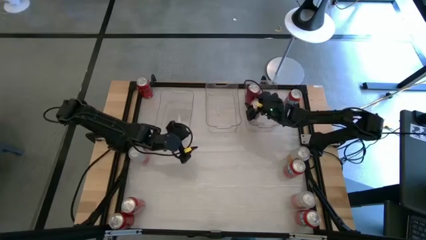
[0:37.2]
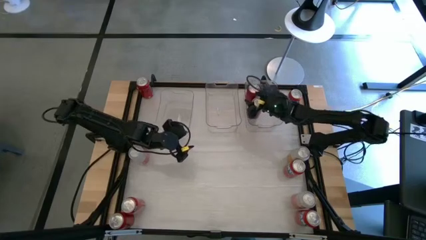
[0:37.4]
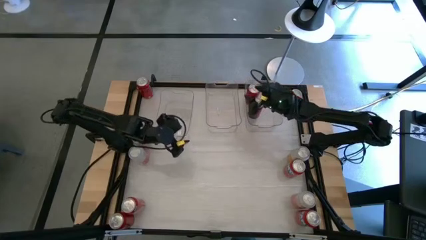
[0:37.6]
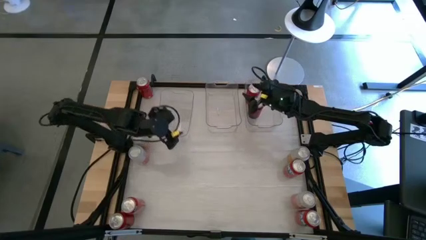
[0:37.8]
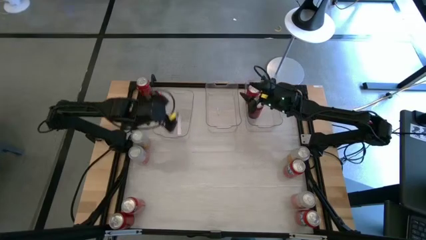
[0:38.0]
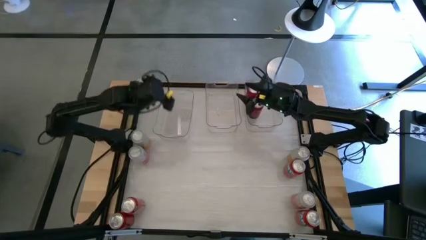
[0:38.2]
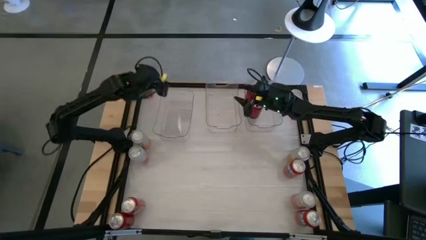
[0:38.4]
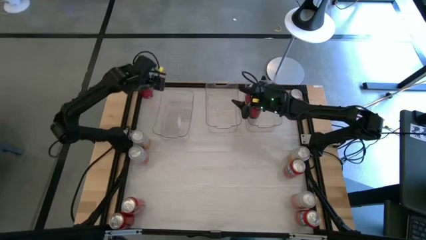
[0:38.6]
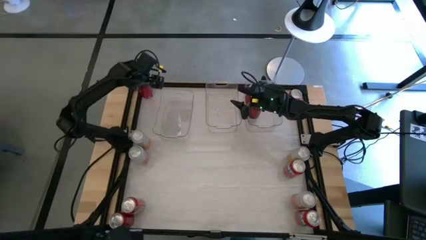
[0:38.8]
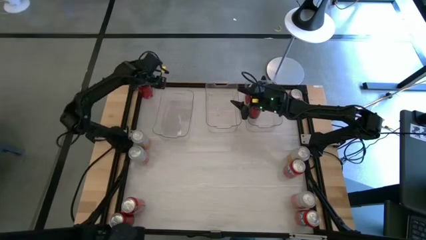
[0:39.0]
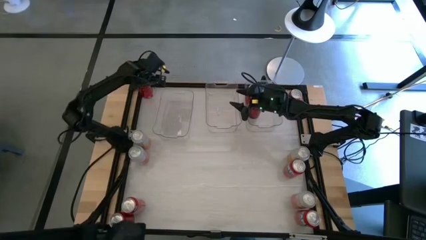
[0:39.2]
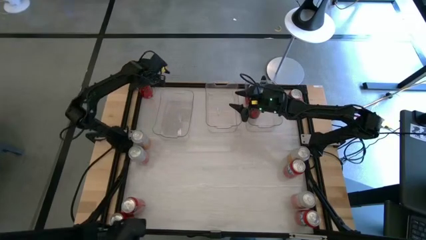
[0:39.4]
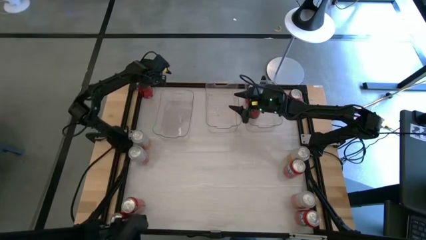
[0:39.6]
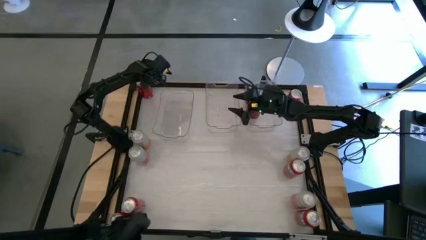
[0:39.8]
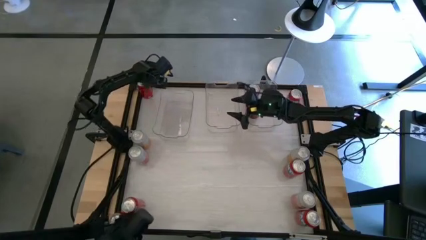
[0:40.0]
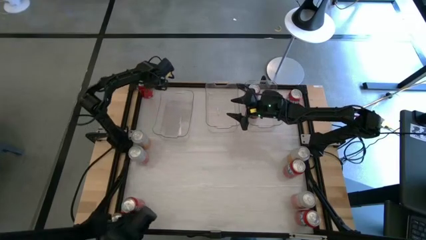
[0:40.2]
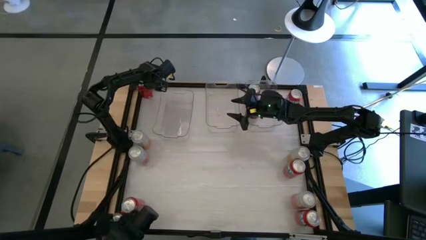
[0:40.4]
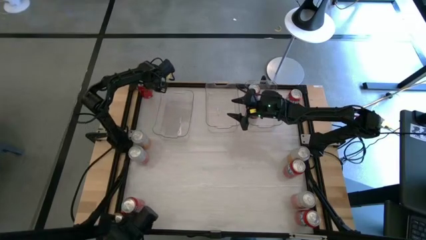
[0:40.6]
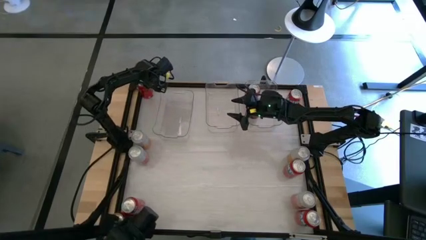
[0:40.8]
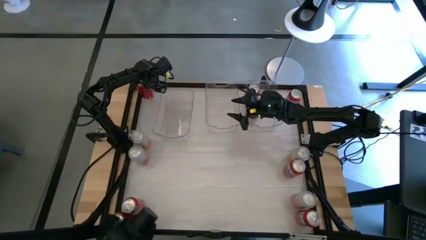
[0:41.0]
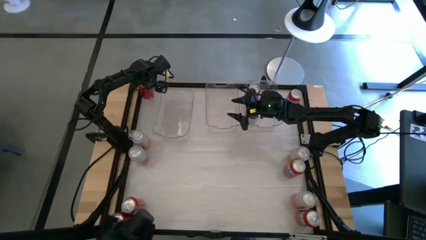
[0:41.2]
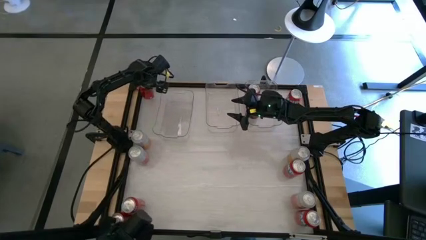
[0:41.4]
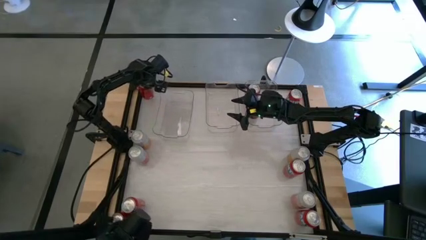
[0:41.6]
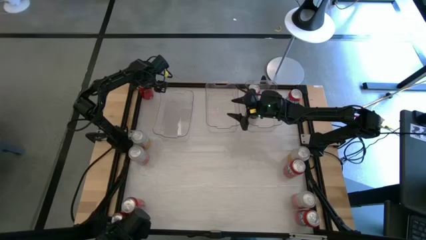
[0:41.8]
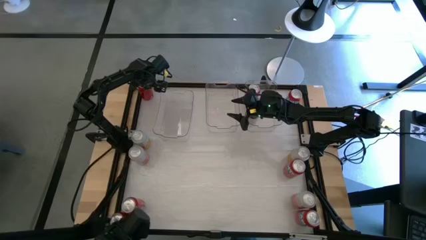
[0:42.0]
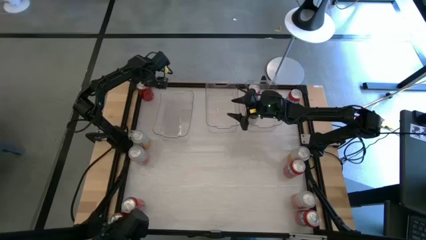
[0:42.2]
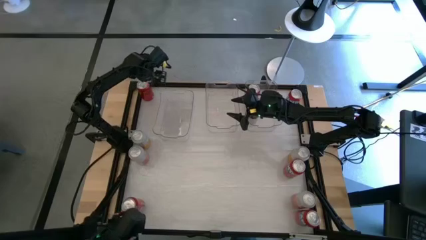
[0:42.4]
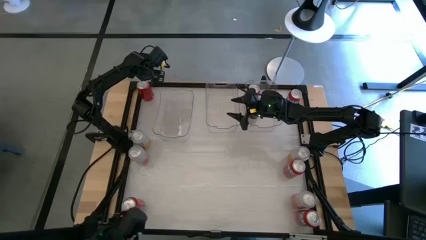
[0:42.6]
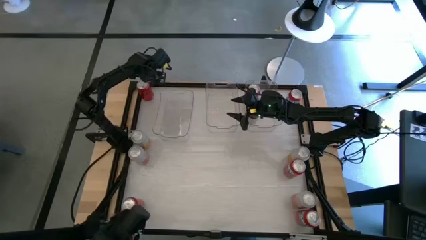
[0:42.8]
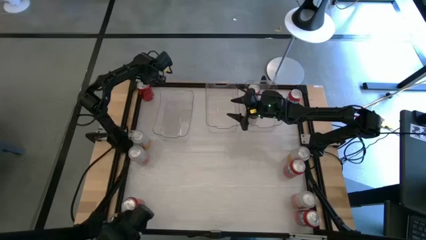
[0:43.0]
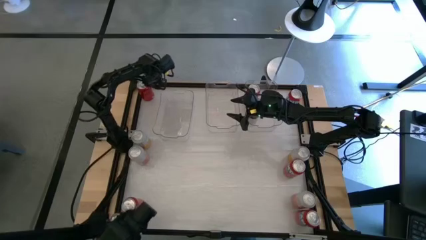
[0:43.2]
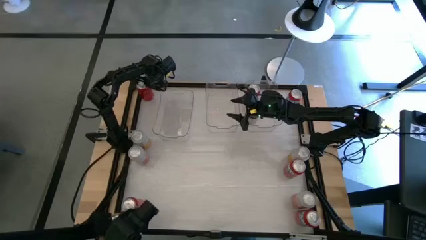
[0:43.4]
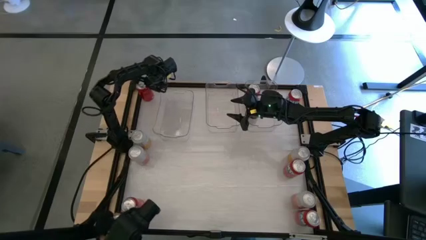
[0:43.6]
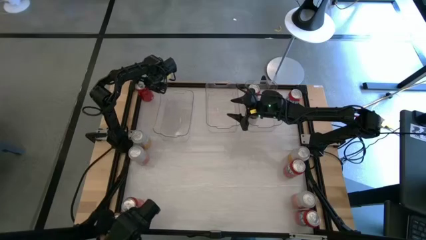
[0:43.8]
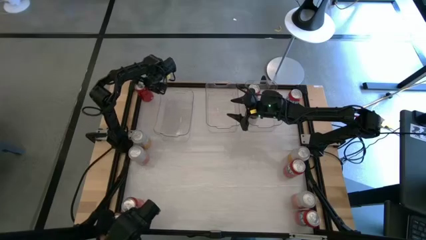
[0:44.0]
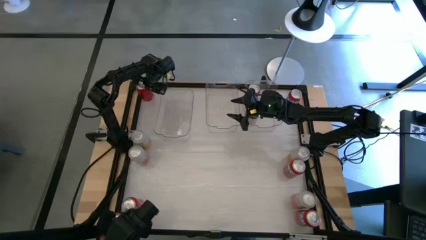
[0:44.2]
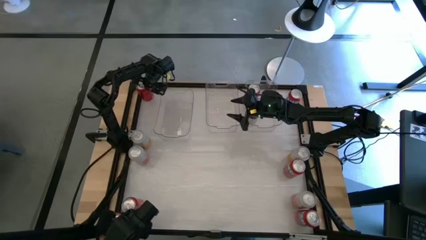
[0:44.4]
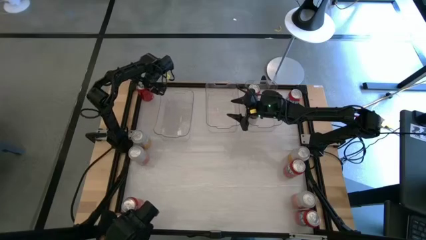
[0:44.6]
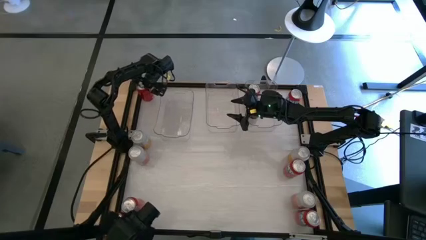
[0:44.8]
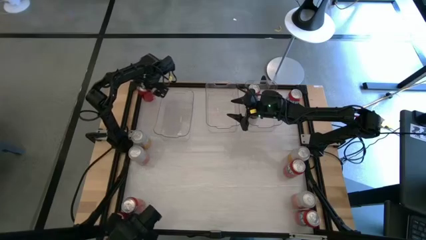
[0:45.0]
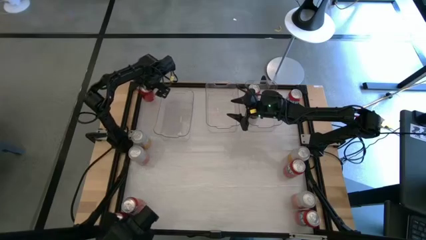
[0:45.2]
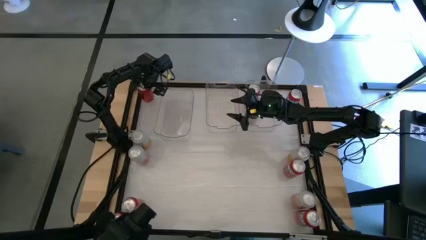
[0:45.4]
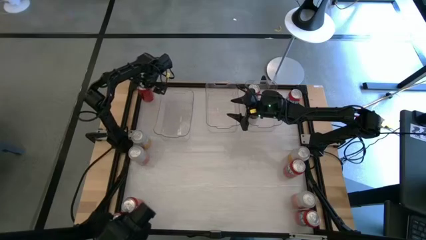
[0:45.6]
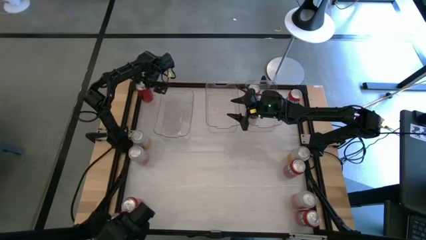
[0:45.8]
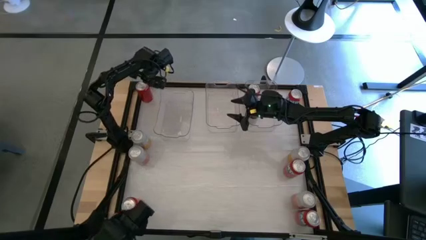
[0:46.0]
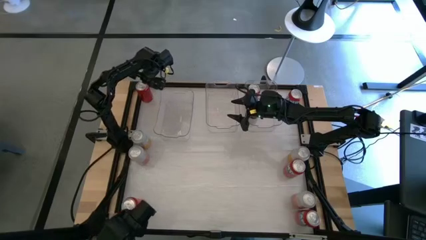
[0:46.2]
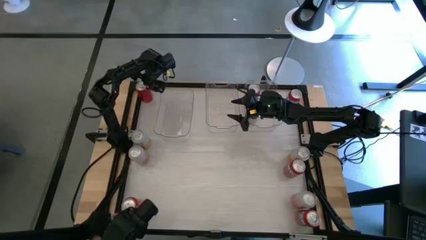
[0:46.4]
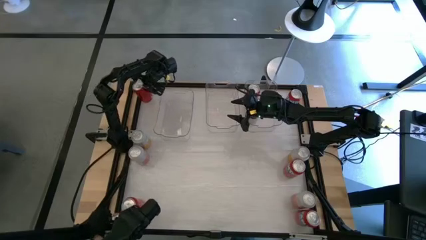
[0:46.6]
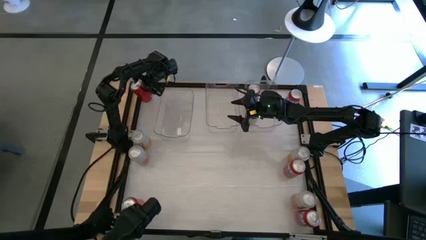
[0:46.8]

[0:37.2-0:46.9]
Task: Sort soda cans
Put the top red black soda can into the right transparent bin

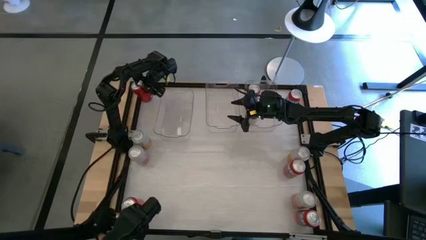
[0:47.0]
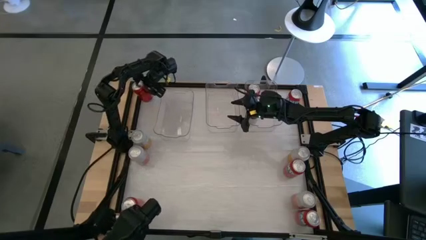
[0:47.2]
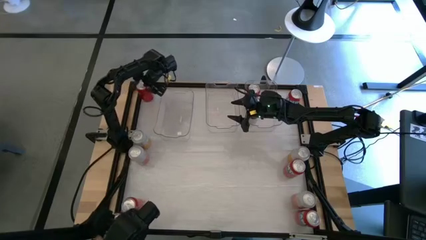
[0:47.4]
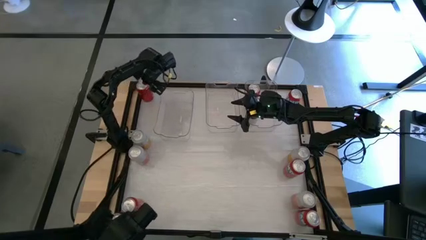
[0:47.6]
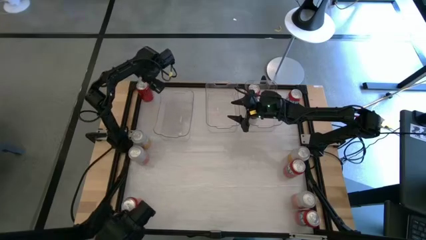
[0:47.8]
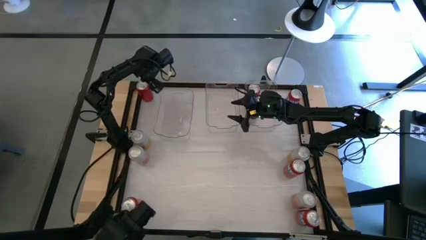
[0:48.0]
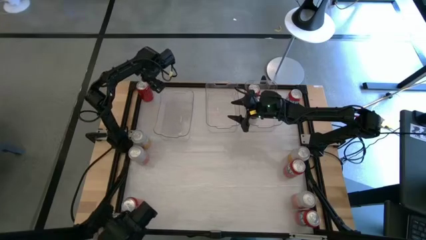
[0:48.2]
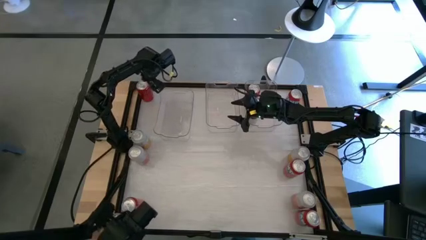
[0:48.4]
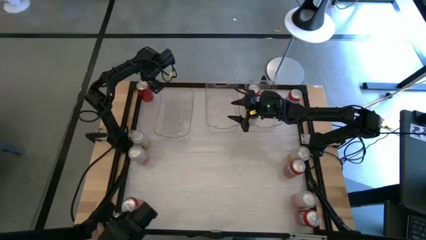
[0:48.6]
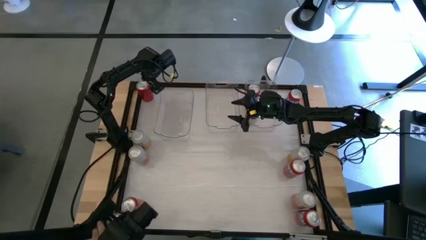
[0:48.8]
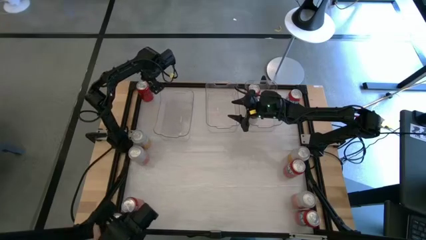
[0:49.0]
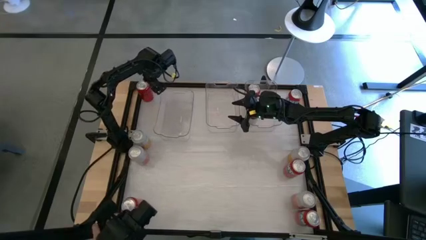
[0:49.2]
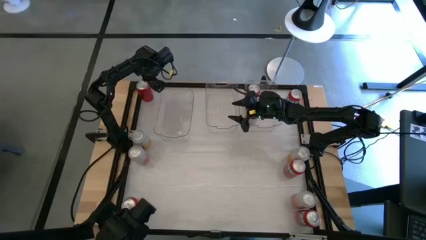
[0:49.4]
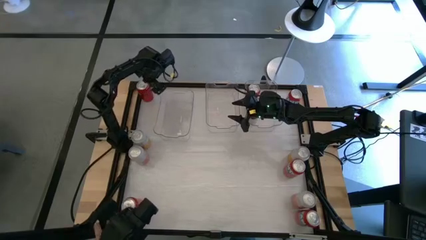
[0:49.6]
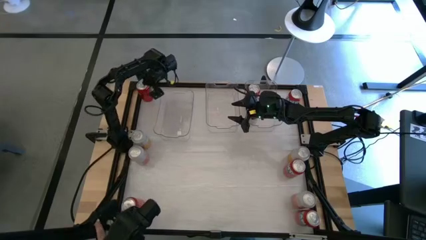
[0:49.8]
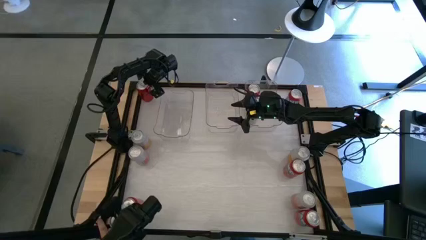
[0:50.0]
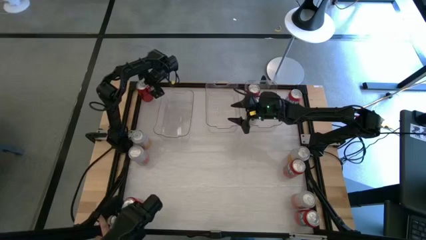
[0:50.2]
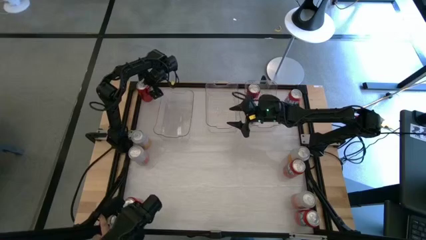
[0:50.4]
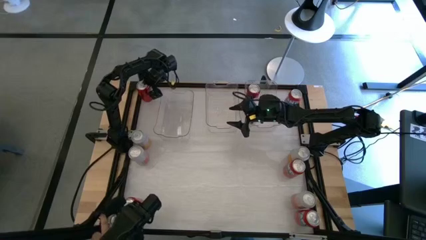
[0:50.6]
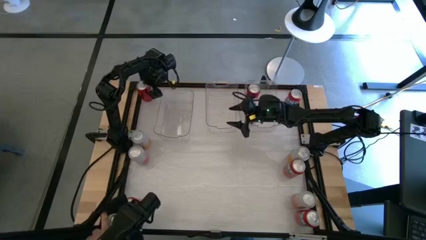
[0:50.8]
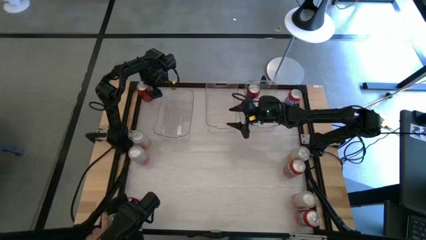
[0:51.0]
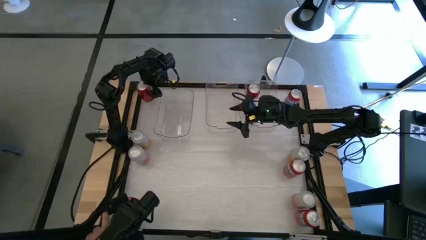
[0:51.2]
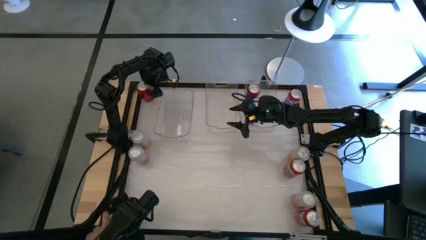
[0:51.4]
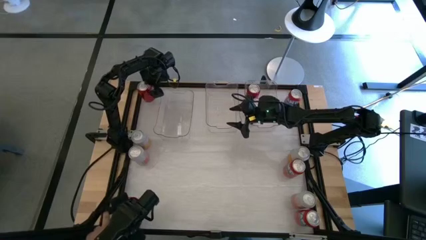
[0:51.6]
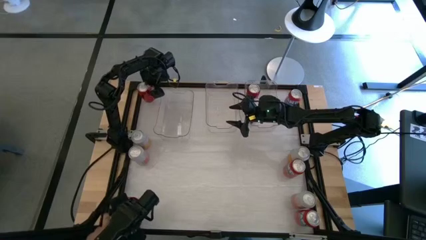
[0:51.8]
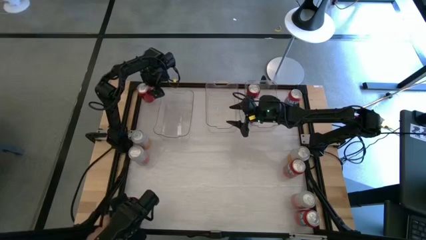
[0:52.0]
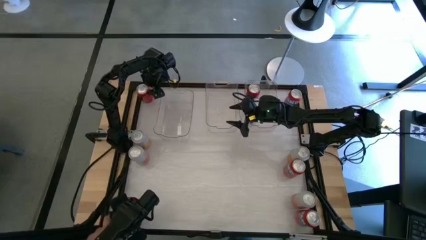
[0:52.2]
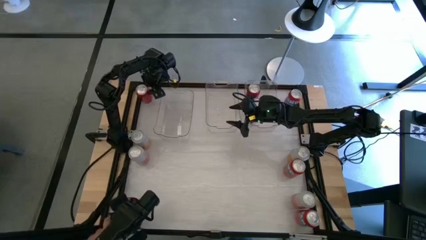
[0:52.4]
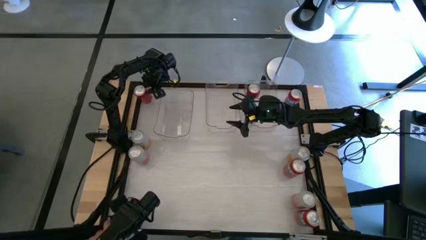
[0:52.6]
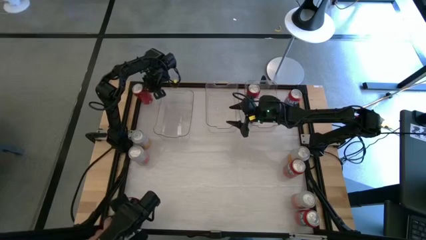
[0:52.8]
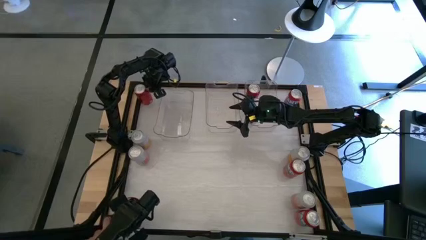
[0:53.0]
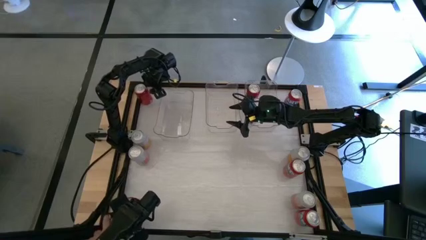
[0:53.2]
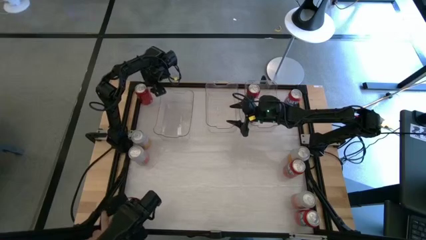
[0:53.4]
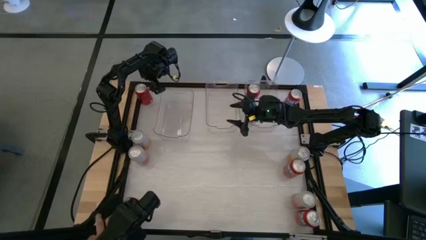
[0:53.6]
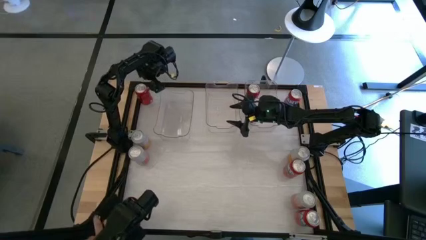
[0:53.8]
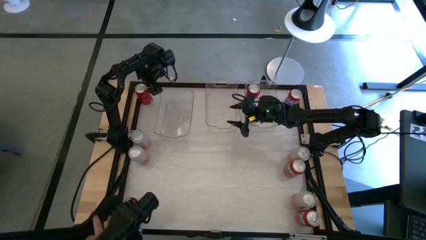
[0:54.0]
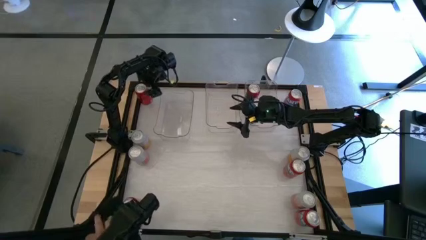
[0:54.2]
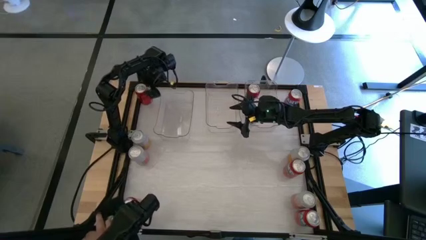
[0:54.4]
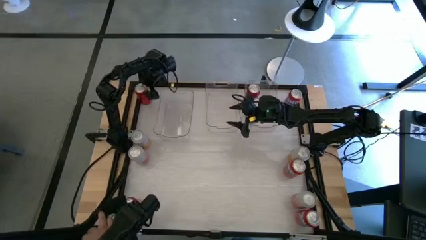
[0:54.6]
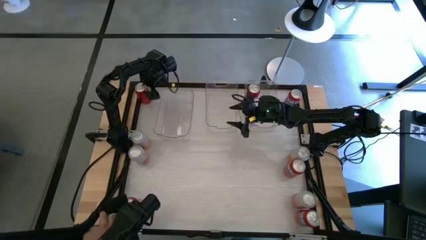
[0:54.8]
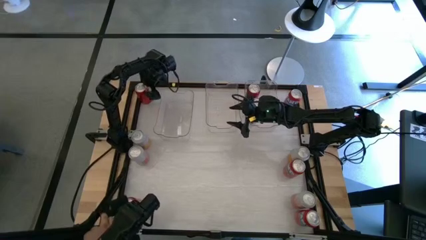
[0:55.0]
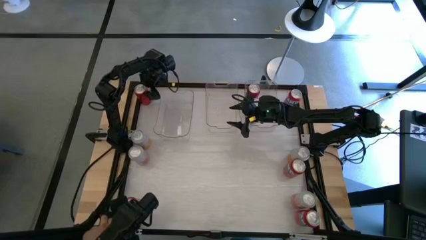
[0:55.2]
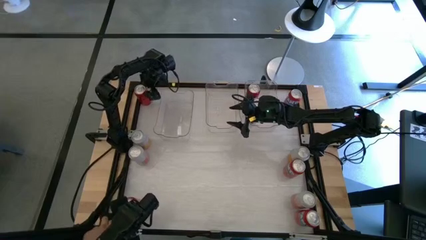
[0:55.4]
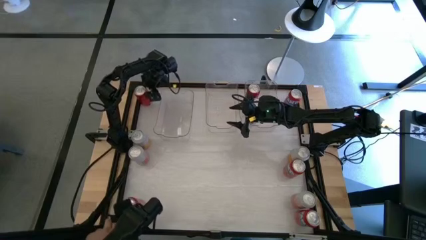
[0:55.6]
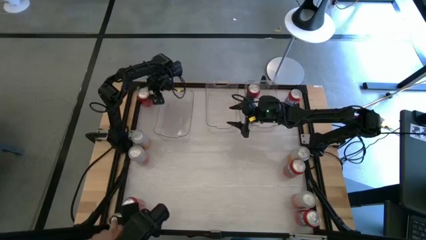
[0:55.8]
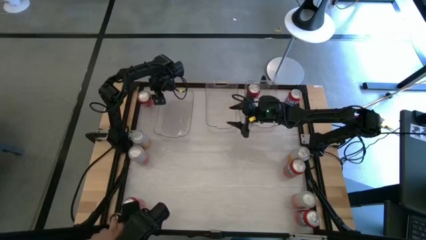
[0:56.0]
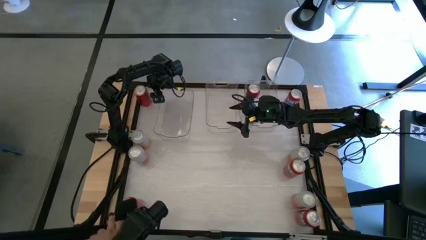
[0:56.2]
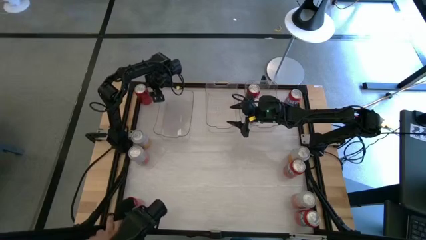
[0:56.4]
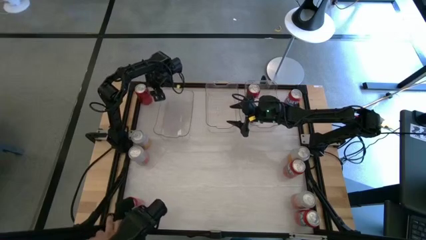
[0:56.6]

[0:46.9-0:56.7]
Put the top red black soda can into the right transparent bin
